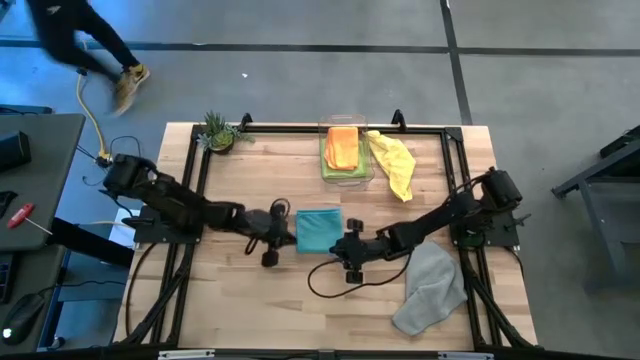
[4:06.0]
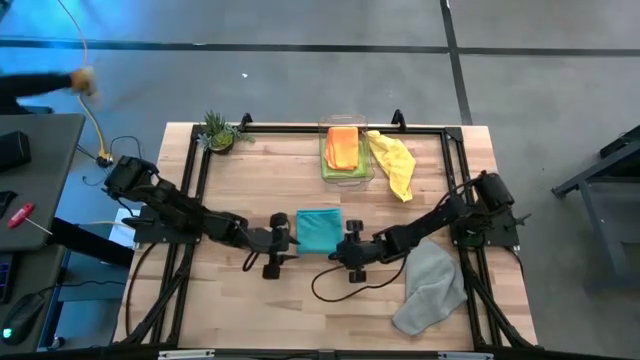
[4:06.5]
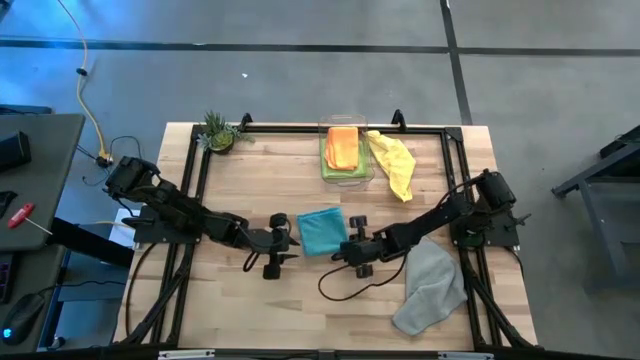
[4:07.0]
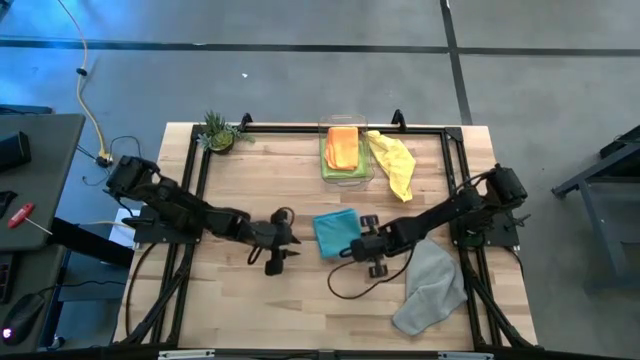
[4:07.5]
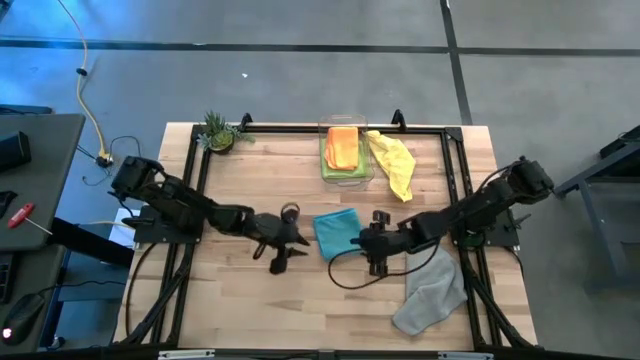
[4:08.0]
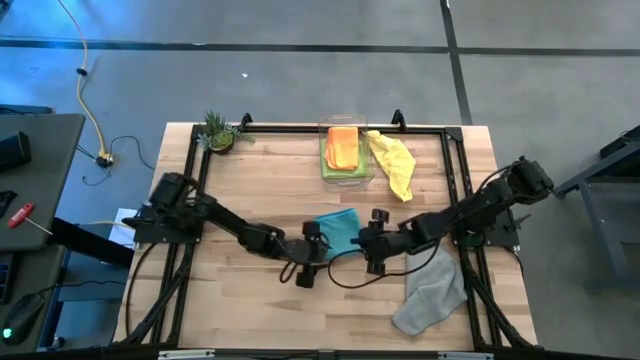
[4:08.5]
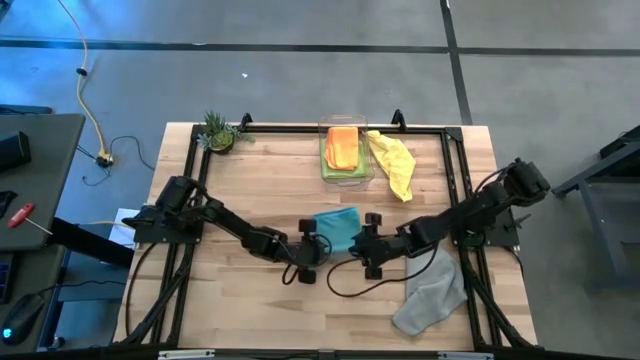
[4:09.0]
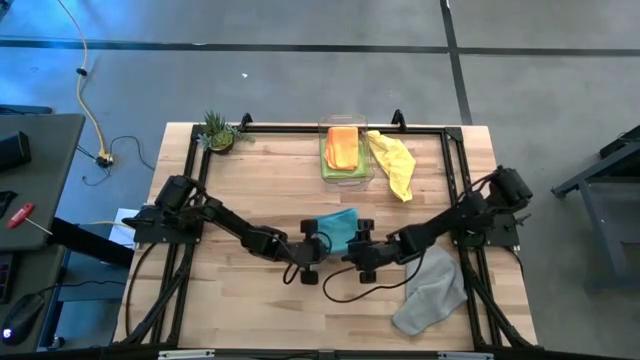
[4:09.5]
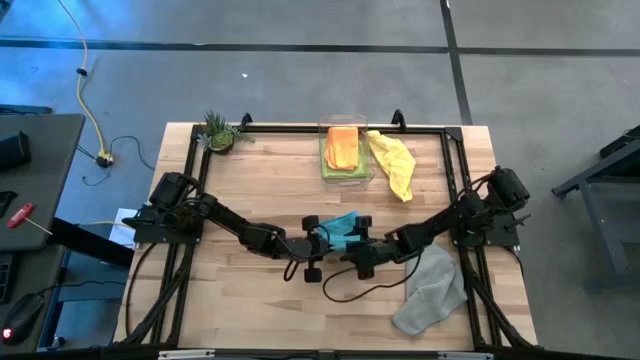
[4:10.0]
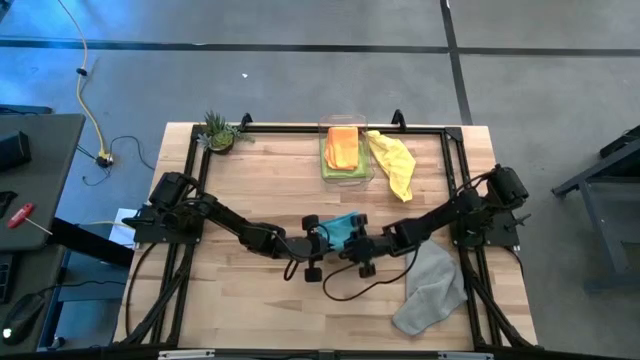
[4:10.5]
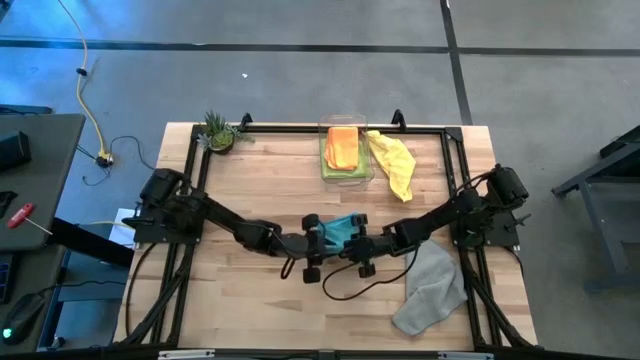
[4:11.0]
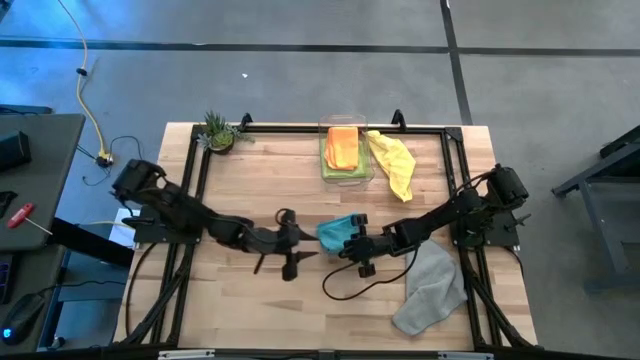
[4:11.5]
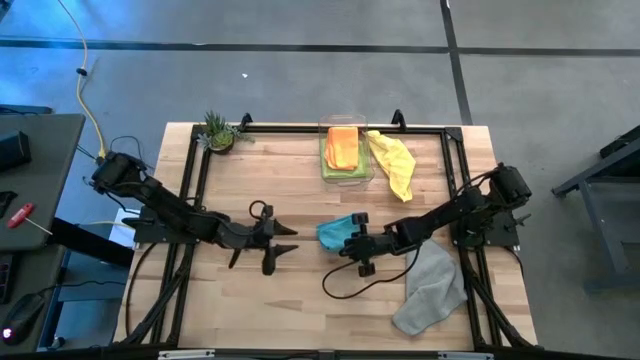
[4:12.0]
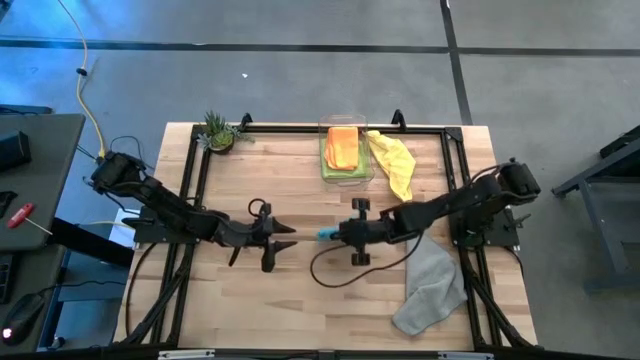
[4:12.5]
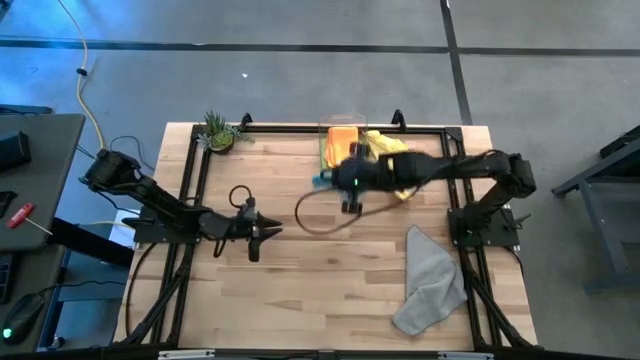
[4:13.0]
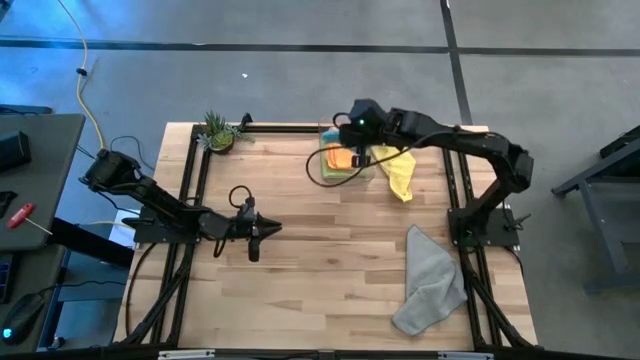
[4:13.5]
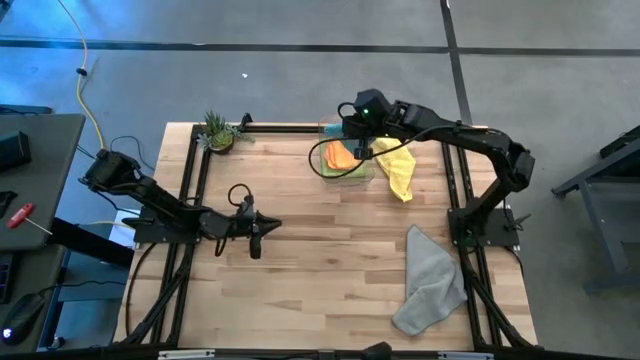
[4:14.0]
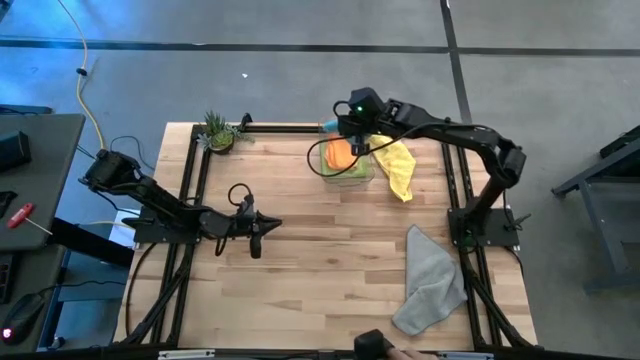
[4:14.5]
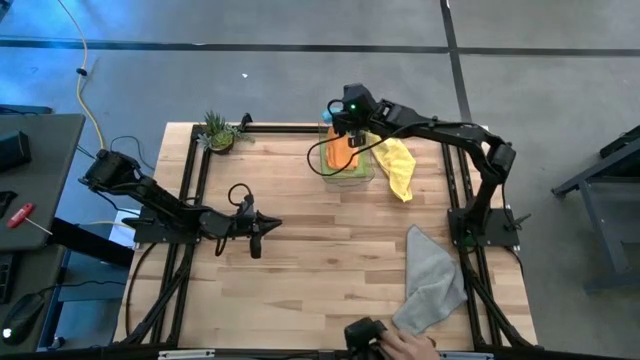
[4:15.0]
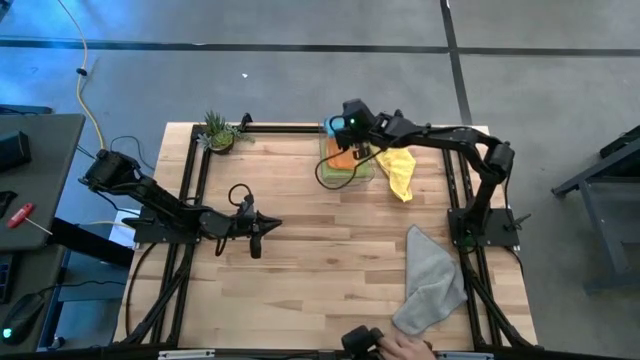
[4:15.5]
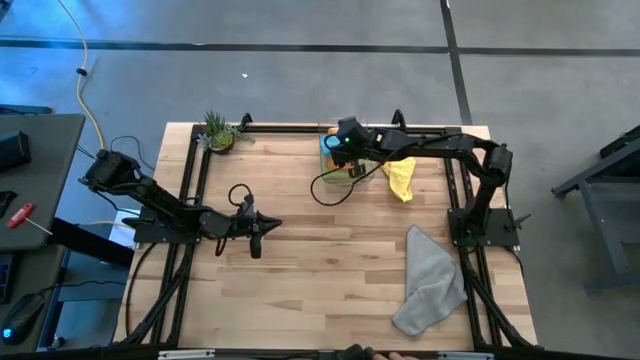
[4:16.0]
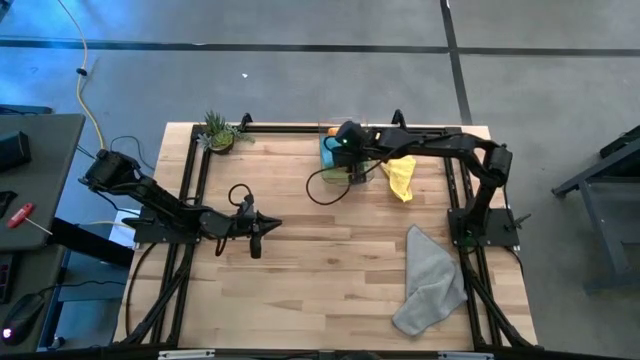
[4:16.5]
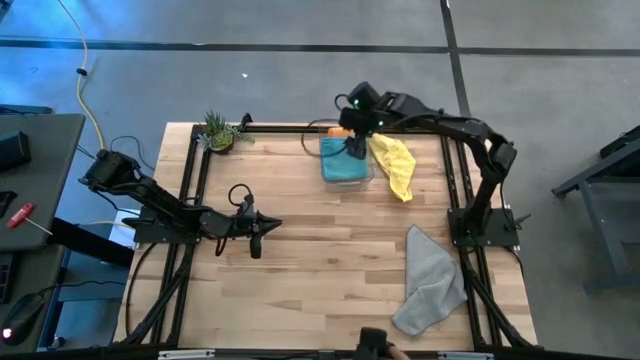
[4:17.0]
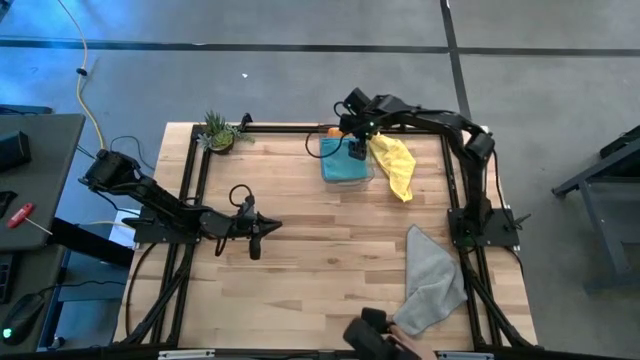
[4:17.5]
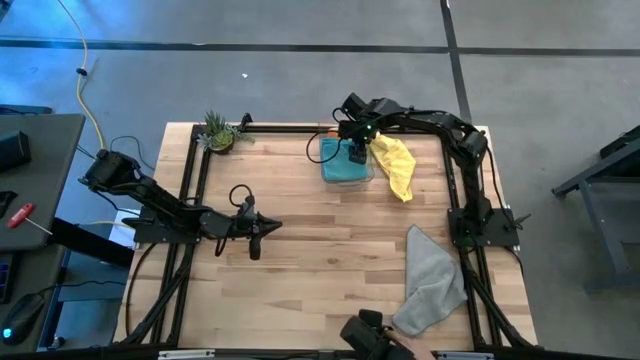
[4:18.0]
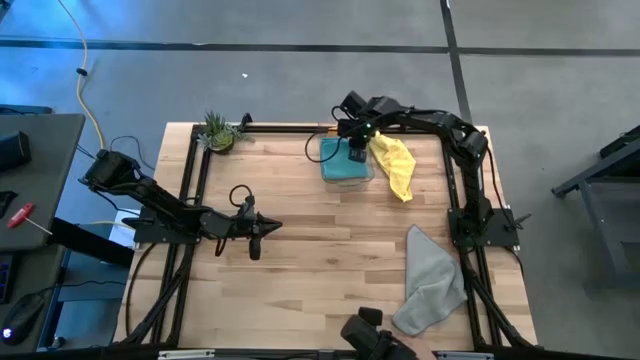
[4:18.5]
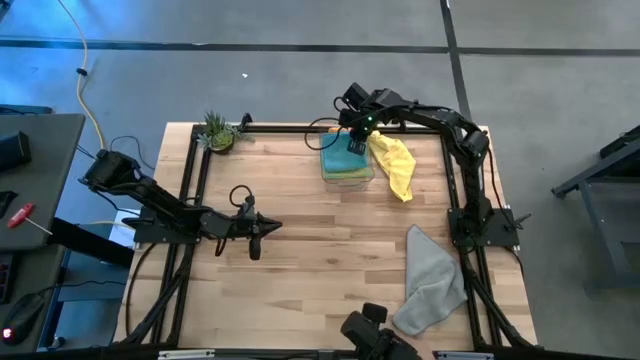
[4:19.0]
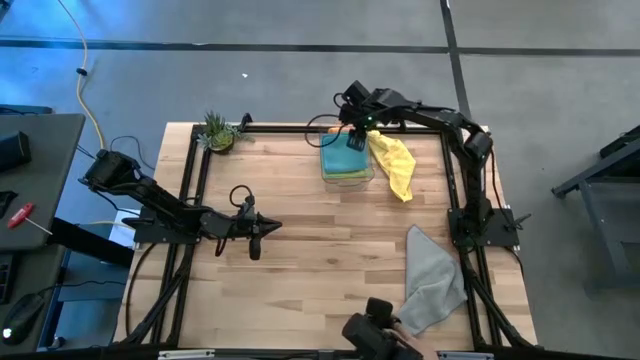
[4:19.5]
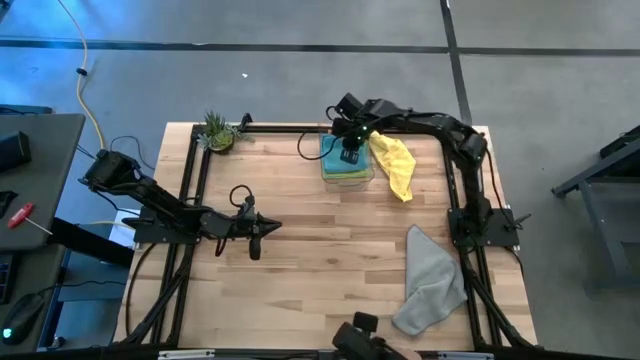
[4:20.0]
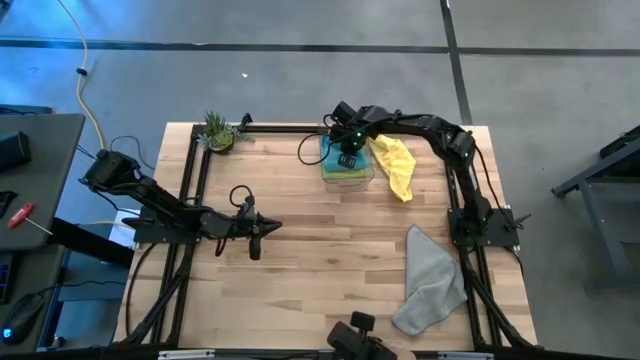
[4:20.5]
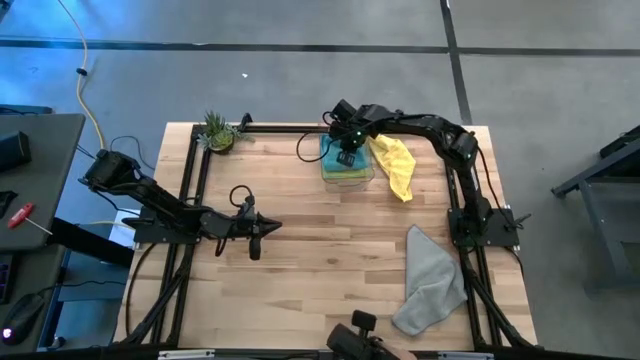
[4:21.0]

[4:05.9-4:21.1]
Task: Fold microfiber towels
Stack the blue microfiber cloth on top of the orange microfiber cloth in the transparent bin

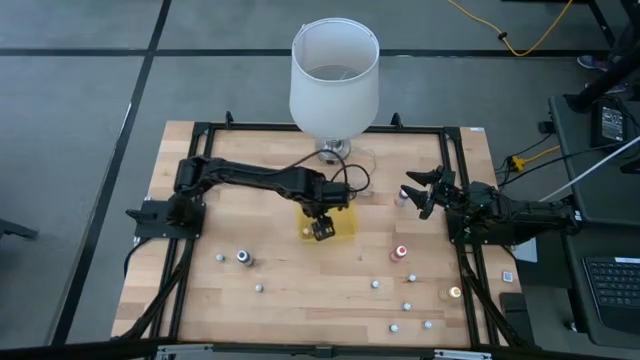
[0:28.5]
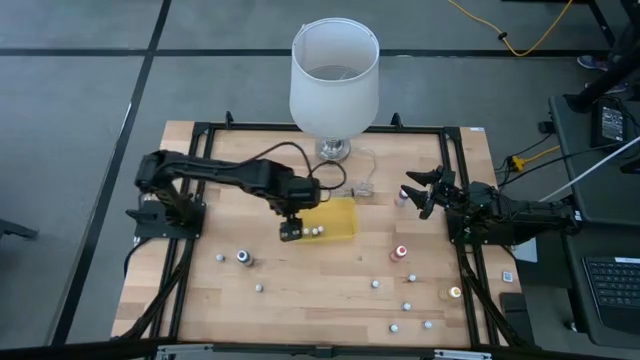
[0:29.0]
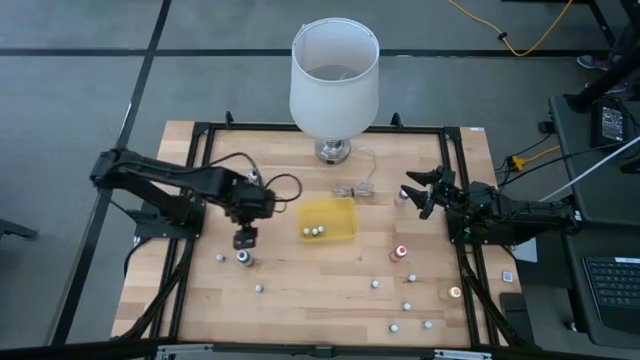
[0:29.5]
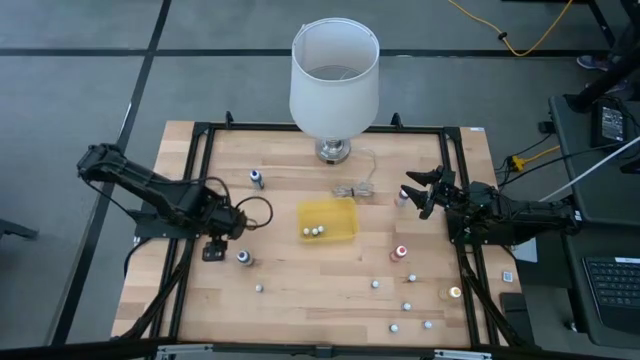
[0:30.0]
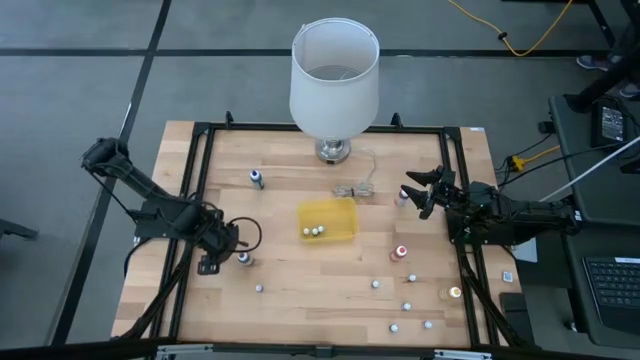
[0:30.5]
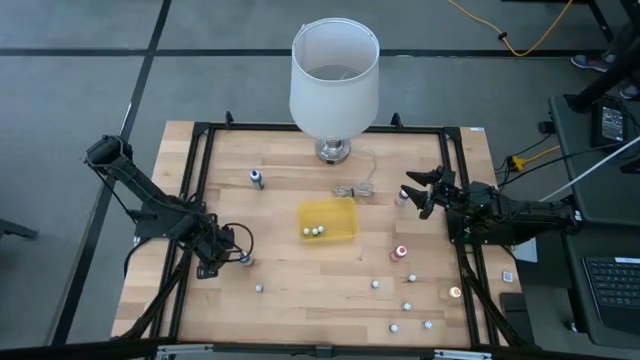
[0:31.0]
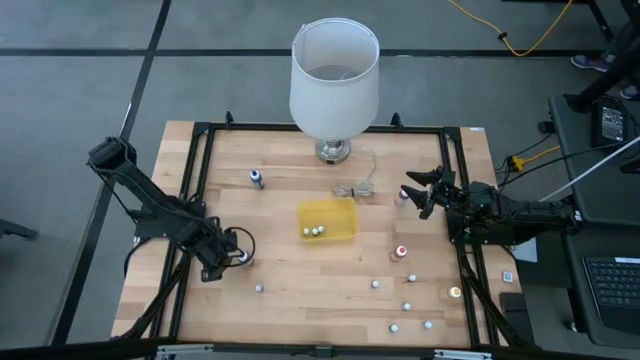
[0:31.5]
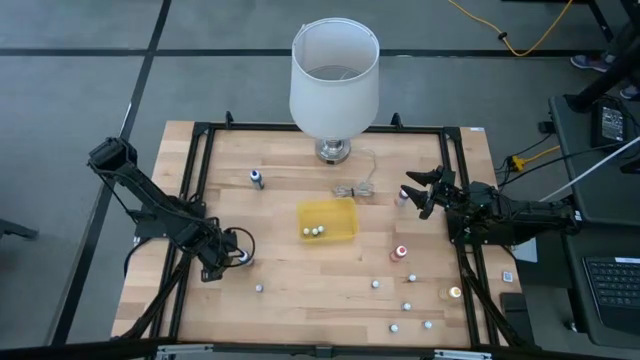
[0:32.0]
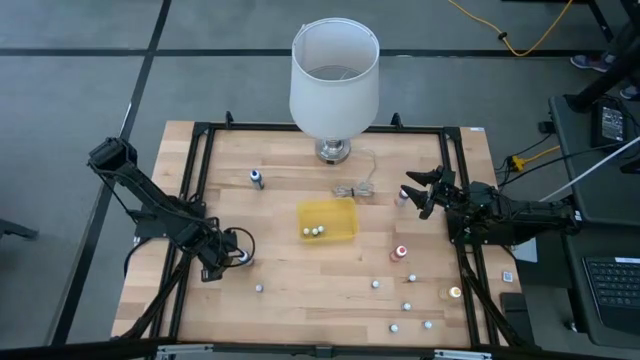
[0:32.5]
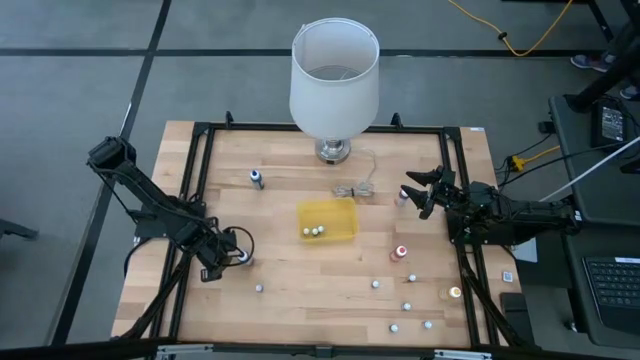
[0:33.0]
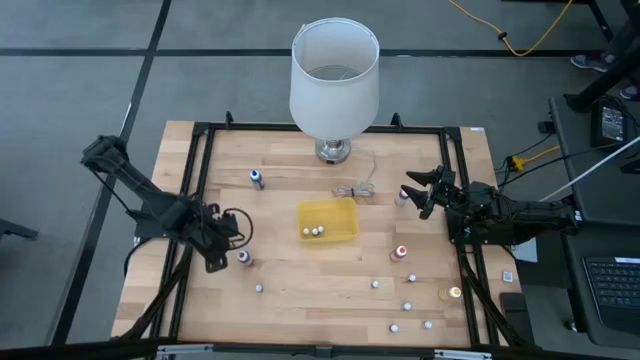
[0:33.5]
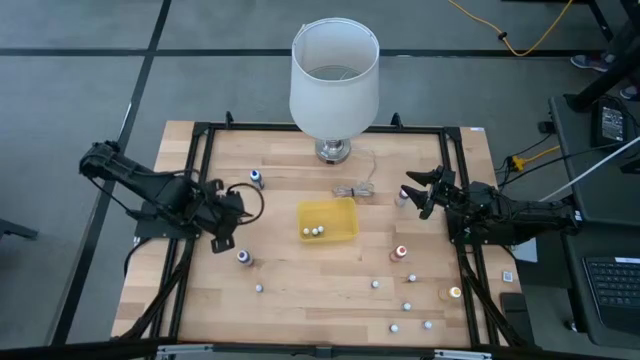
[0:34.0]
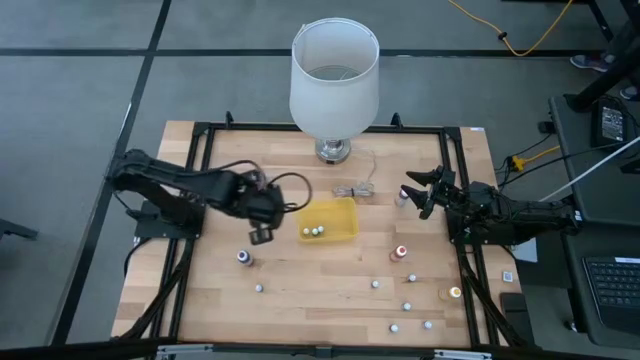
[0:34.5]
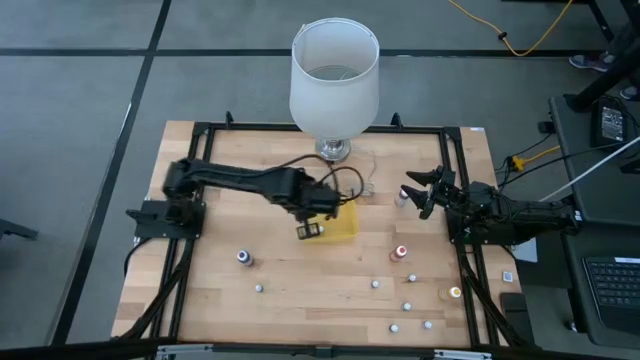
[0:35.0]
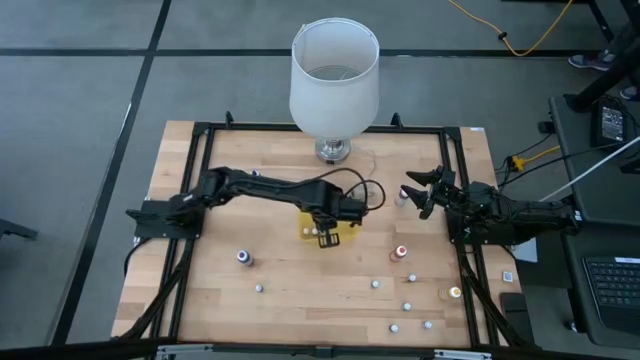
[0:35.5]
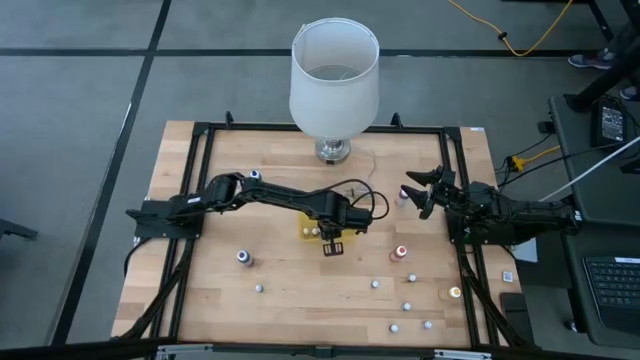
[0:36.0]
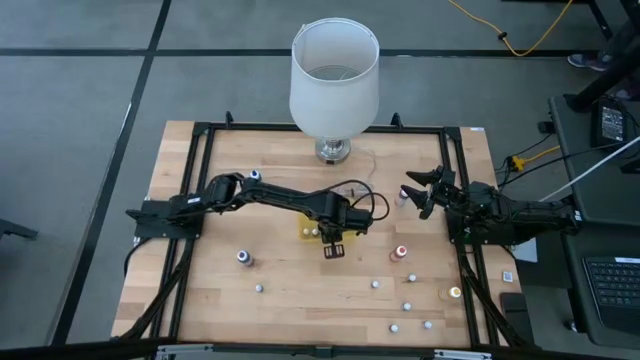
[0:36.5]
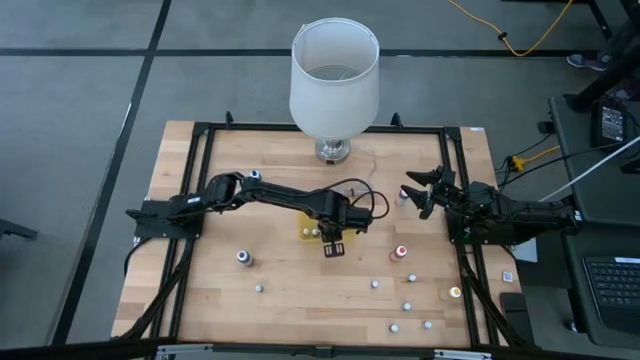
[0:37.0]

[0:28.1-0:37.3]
Task: Pick & Place food coloring
Put the small black food coloring bottle into the yellow bin
